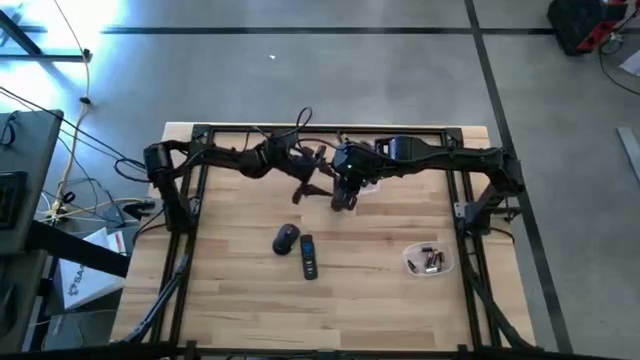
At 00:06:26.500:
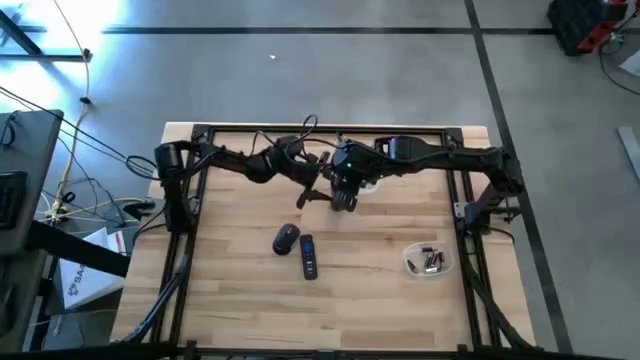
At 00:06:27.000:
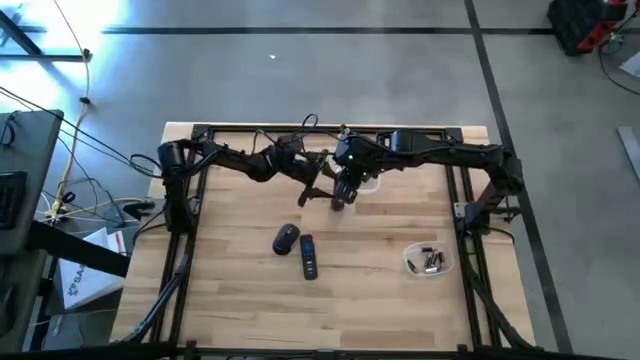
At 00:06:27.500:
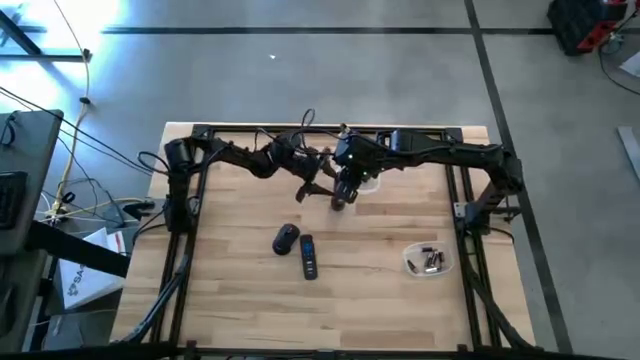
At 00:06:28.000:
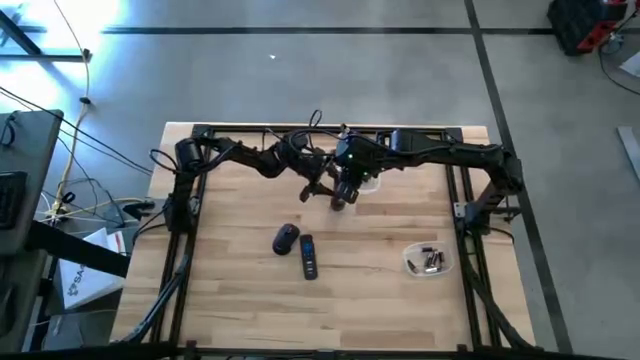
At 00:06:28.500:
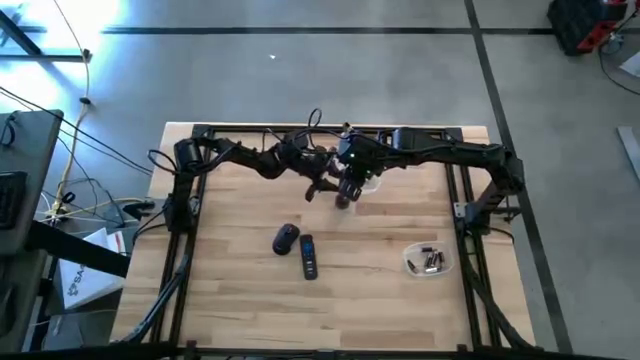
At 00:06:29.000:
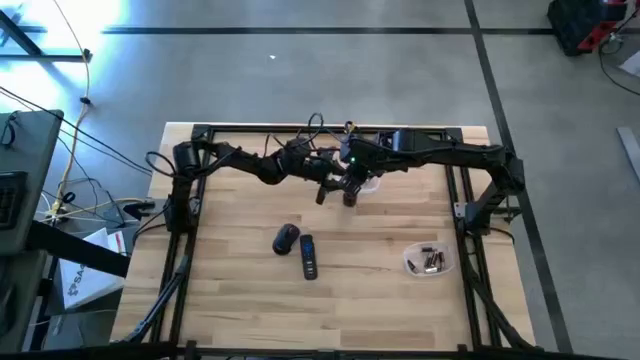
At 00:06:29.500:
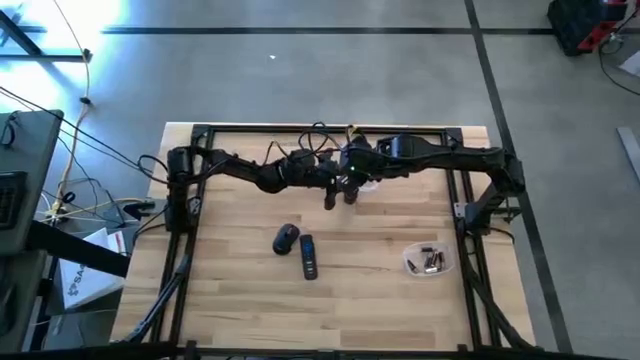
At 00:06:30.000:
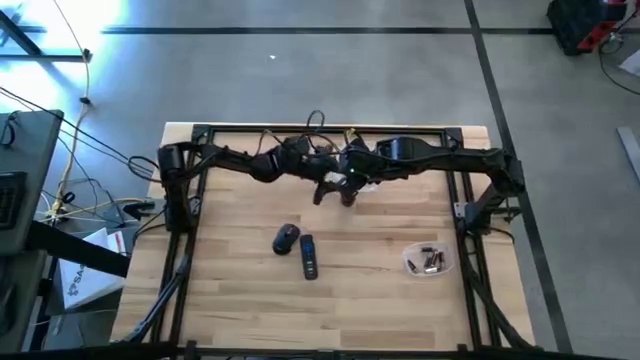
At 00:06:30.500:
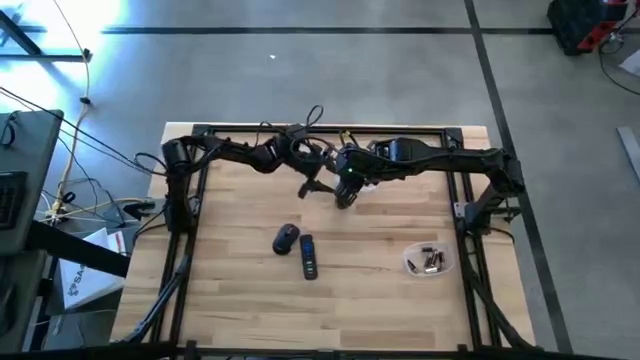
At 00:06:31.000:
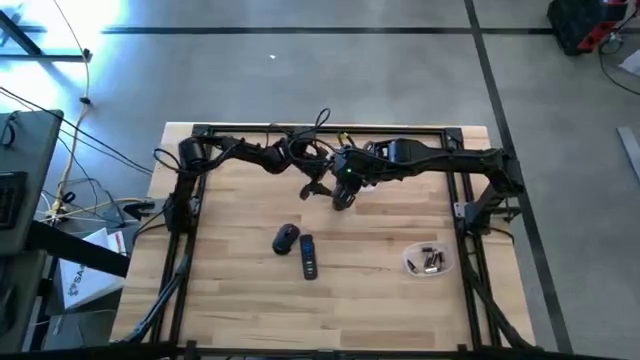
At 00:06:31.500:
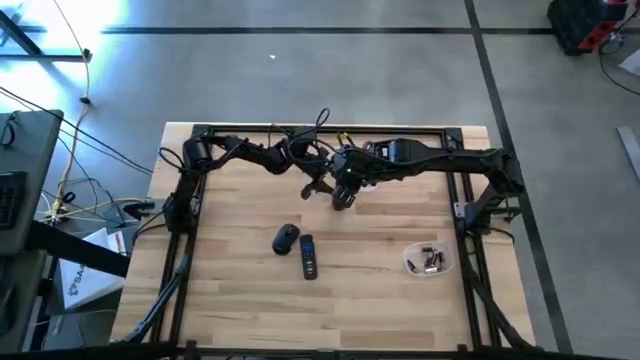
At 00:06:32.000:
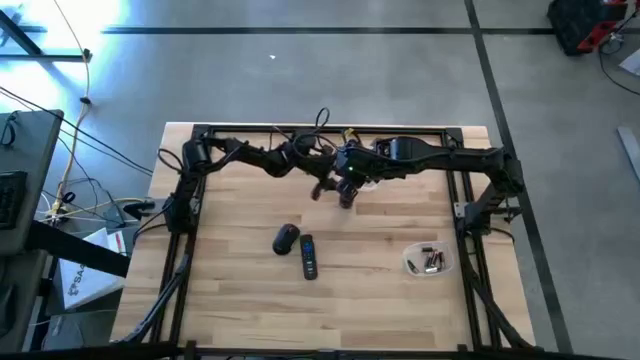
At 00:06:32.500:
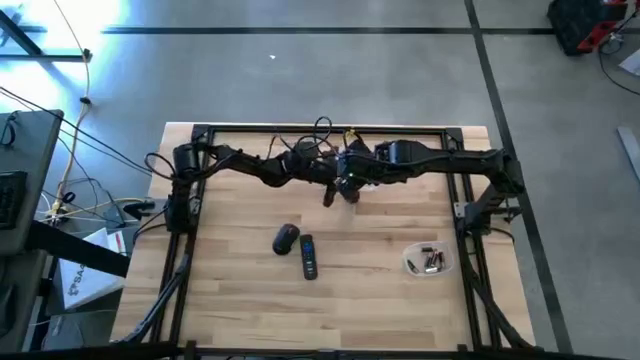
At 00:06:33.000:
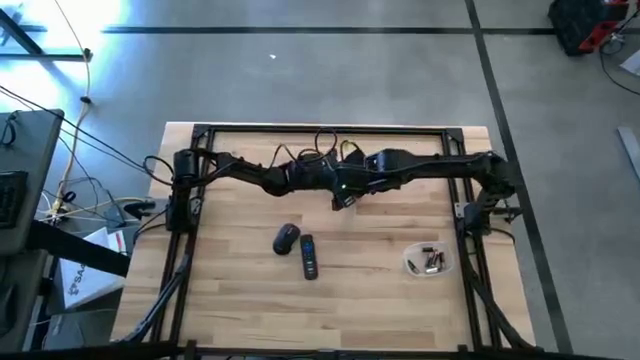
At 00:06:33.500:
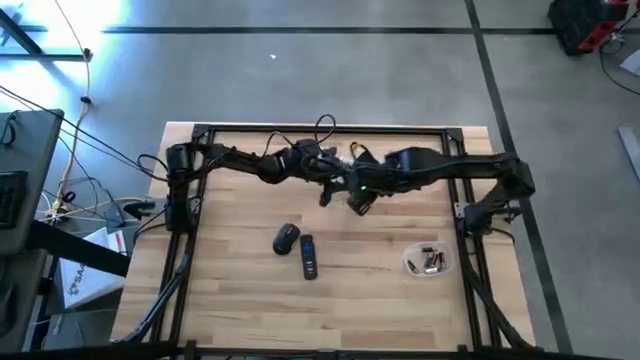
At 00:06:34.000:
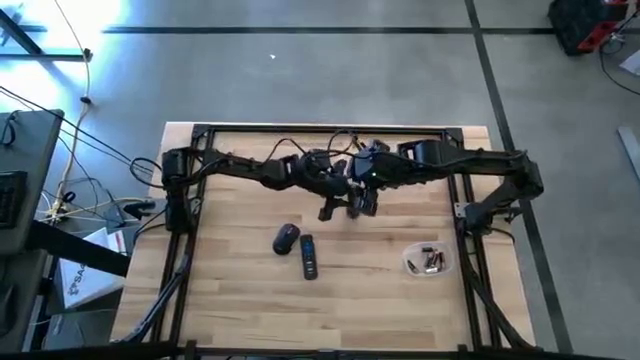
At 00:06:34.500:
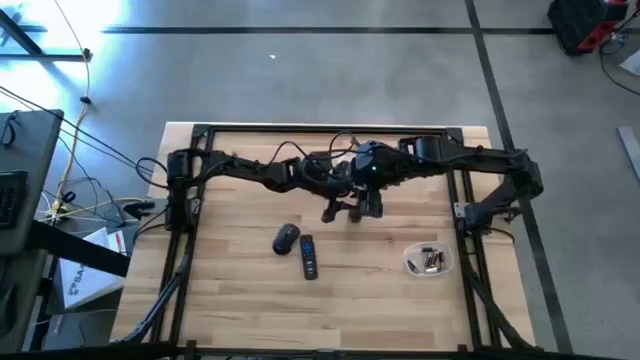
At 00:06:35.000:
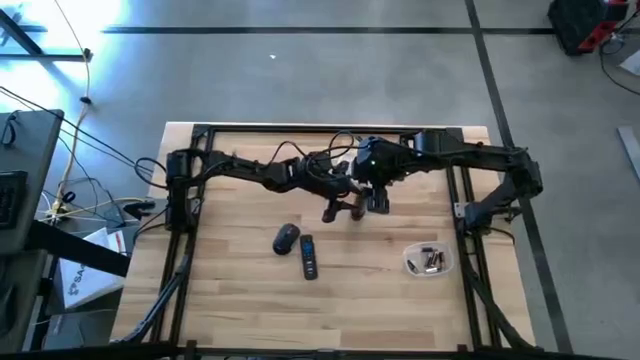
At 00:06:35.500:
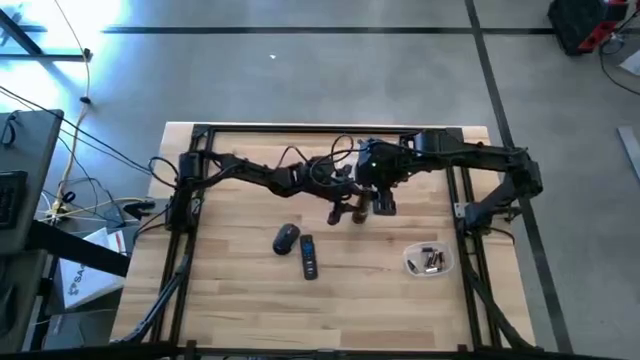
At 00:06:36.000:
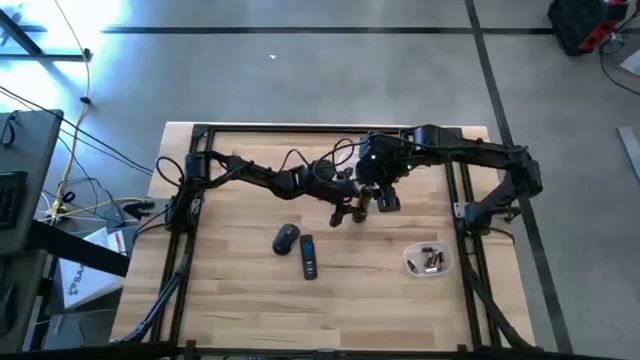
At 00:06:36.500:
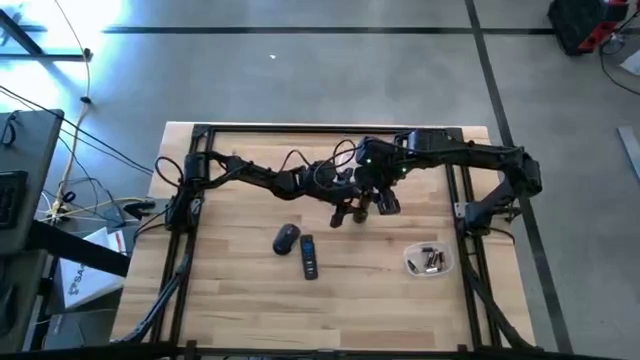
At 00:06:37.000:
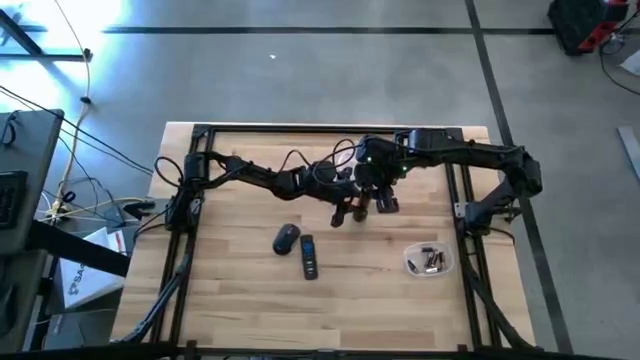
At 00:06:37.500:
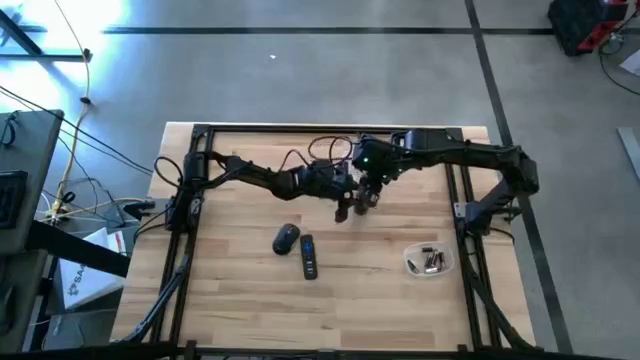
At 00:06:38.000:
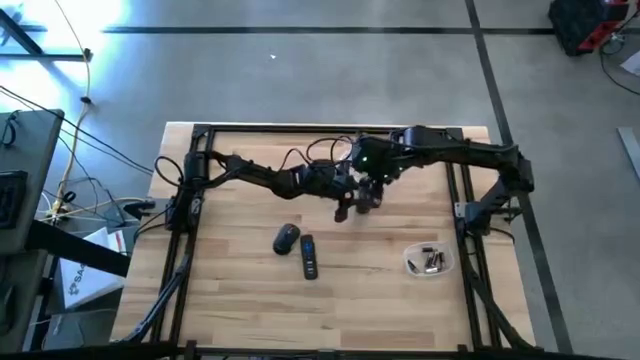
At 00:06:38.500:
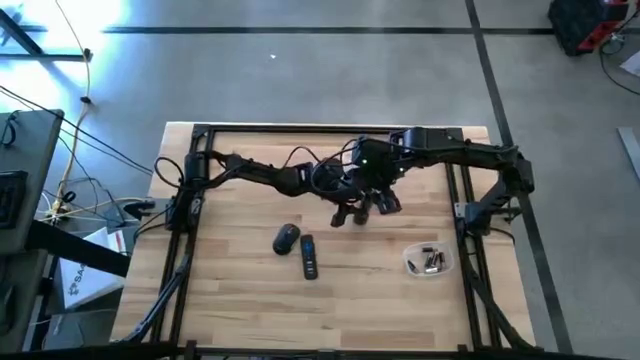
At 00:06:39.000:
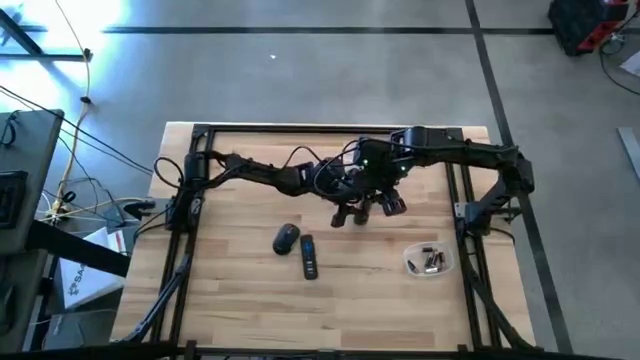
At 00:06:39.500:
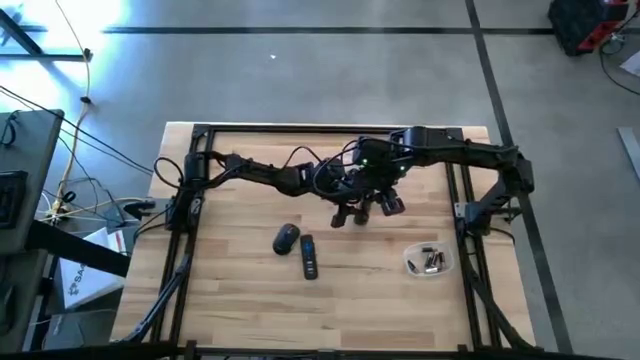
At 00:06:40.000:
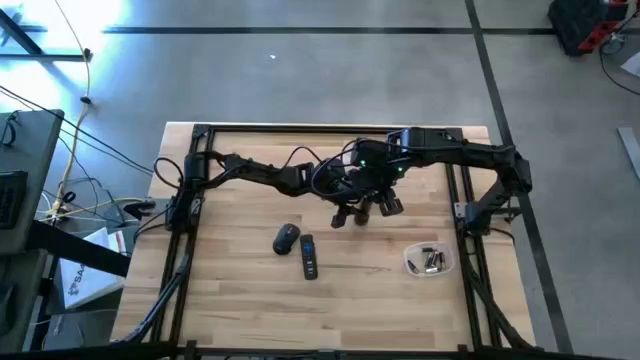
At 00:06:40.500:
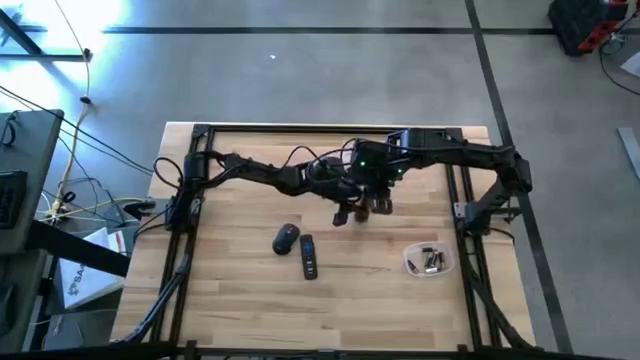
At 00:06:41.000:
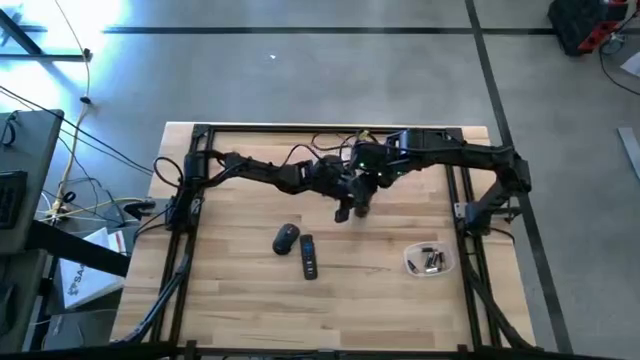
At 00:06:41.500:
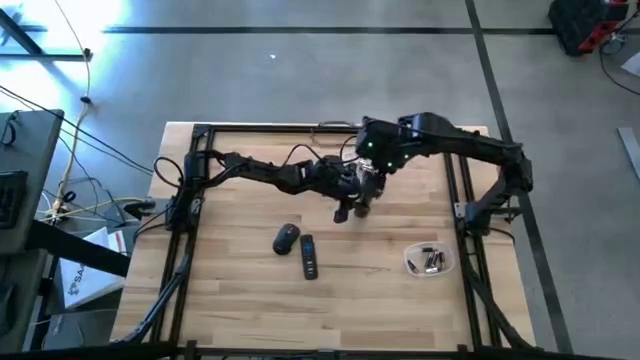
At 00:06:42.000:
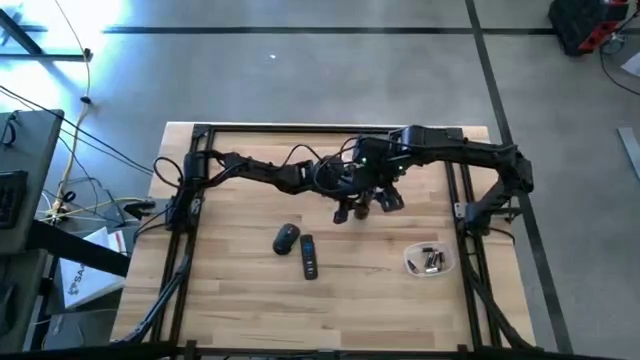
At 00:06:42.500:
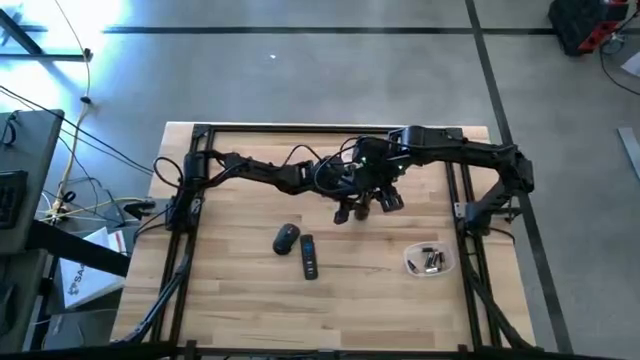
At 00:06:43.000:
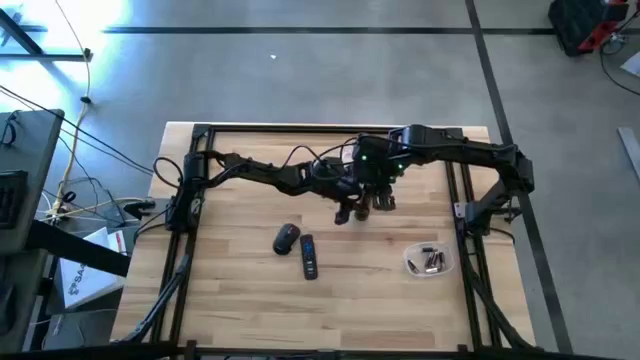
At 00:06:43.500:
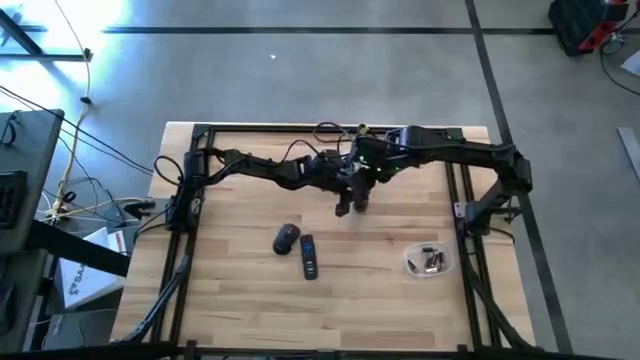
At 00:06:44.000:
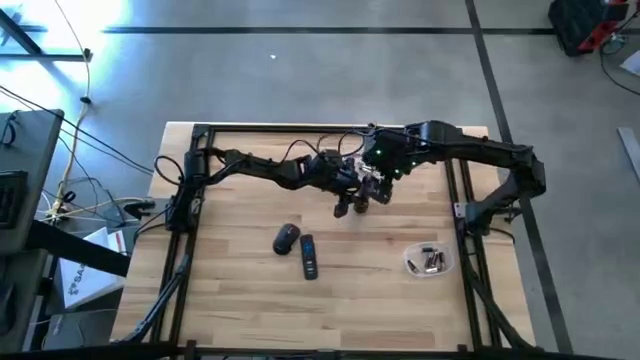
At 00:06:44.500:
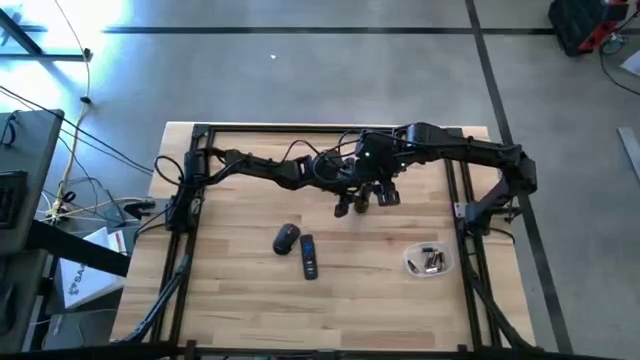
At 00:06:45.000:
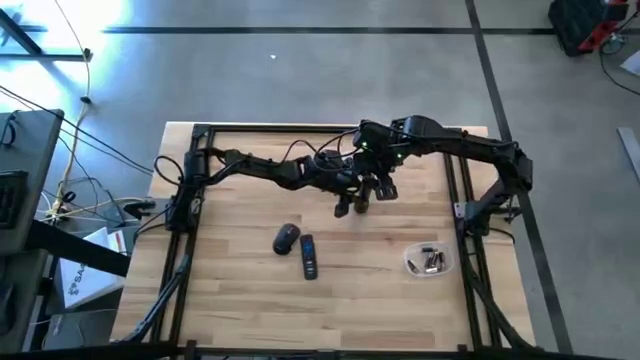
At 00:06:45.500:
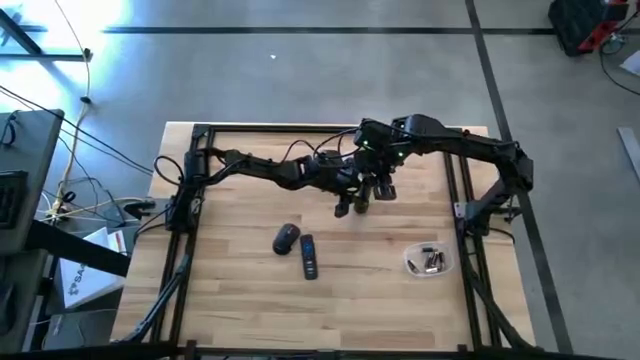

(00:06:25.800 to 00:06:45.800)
Task: Insert battery
Close the flashlight using its cover
